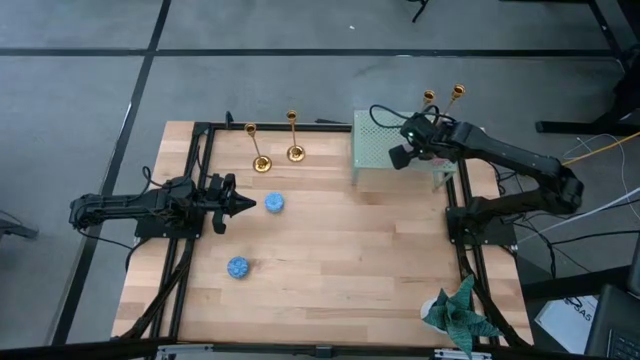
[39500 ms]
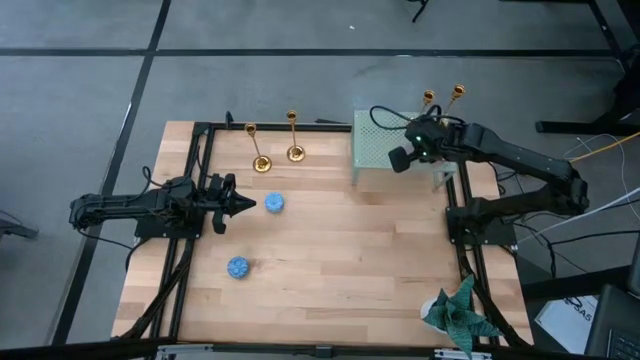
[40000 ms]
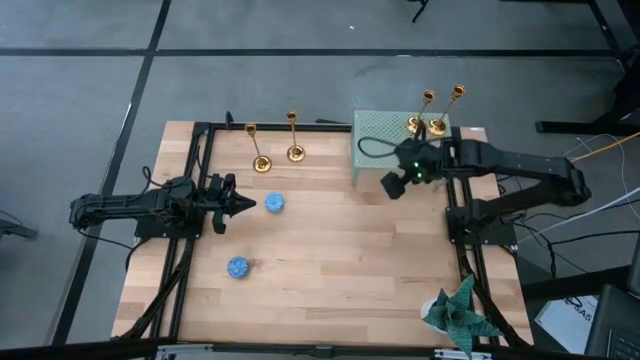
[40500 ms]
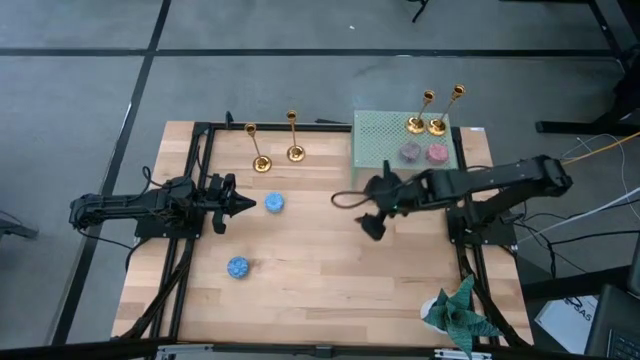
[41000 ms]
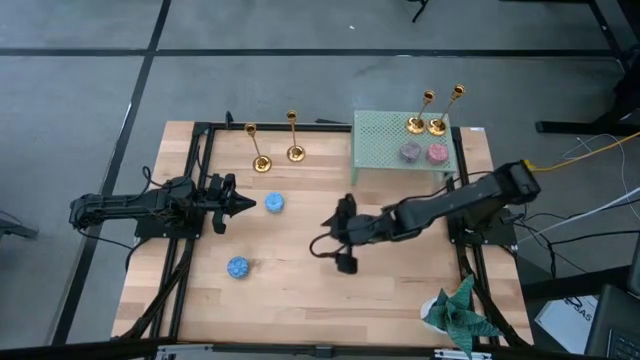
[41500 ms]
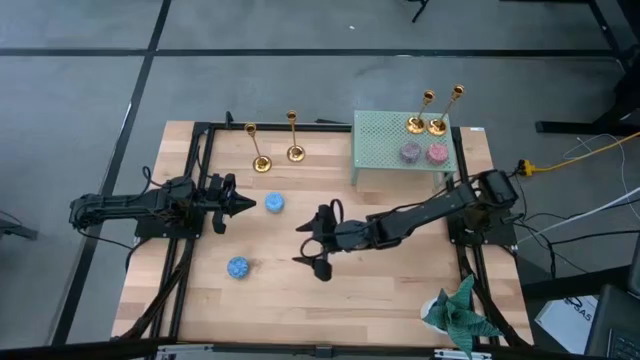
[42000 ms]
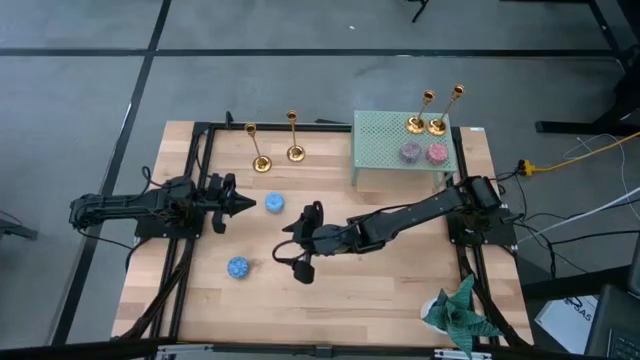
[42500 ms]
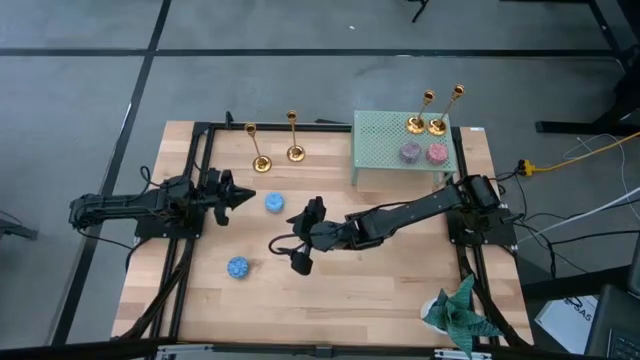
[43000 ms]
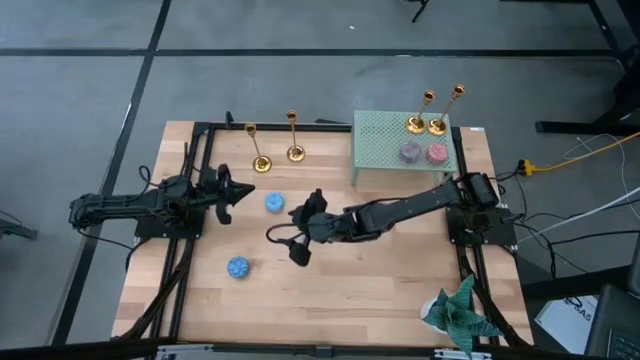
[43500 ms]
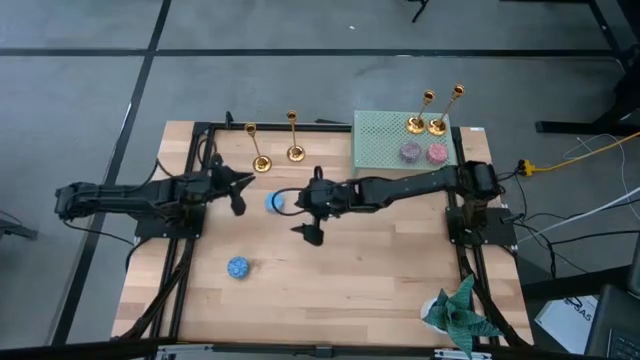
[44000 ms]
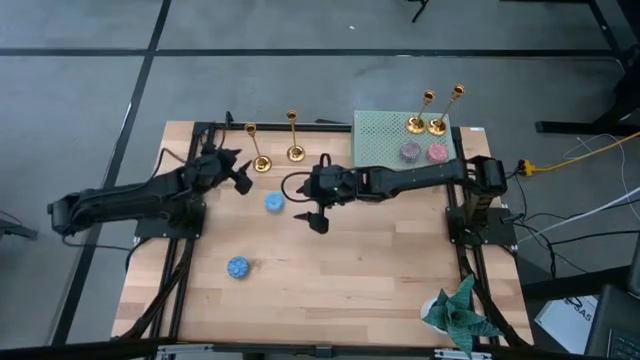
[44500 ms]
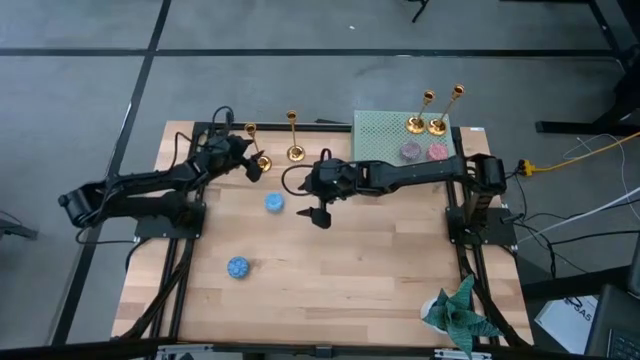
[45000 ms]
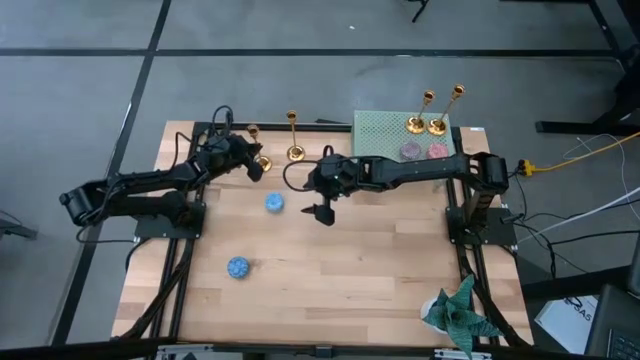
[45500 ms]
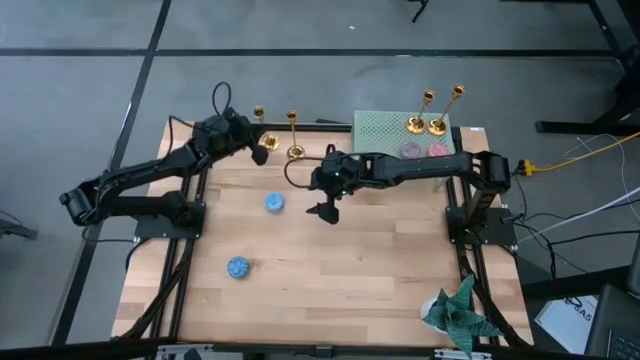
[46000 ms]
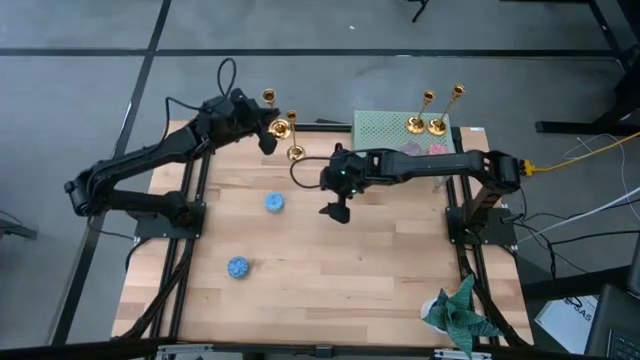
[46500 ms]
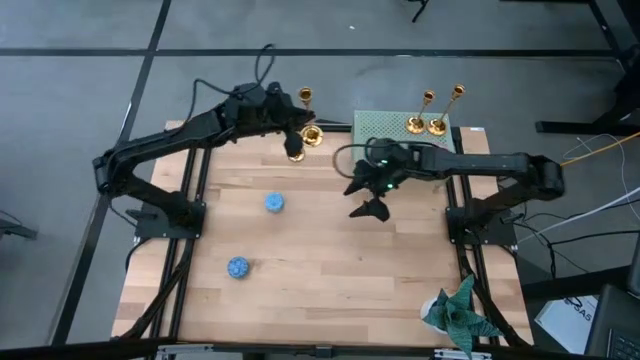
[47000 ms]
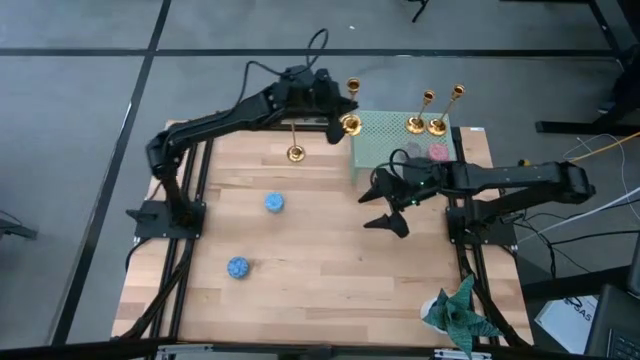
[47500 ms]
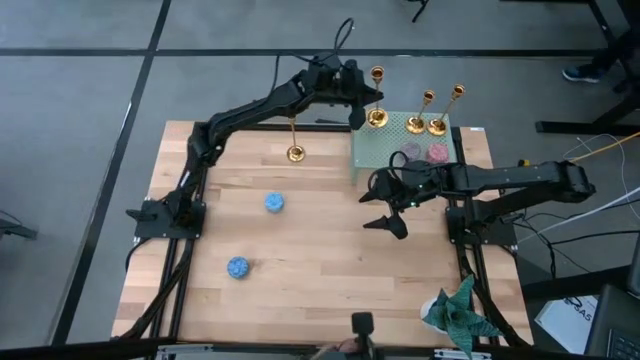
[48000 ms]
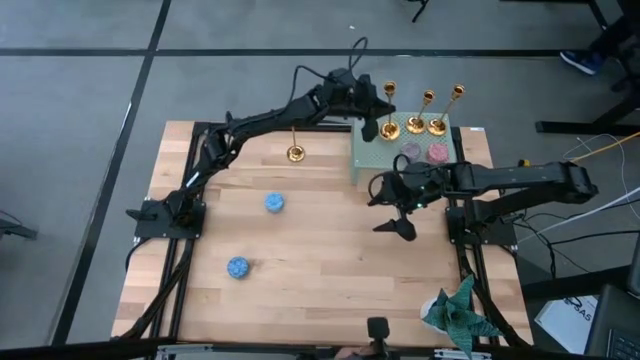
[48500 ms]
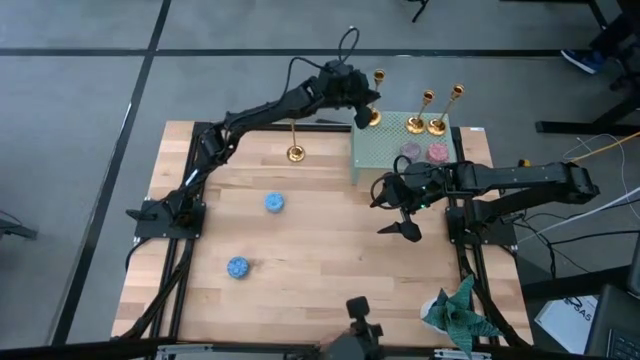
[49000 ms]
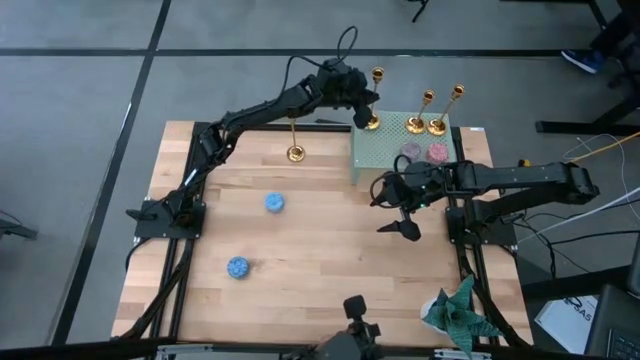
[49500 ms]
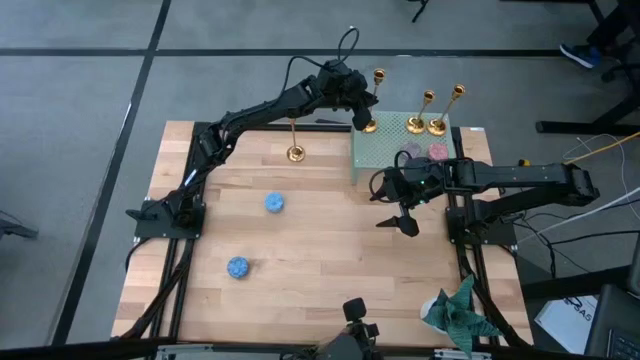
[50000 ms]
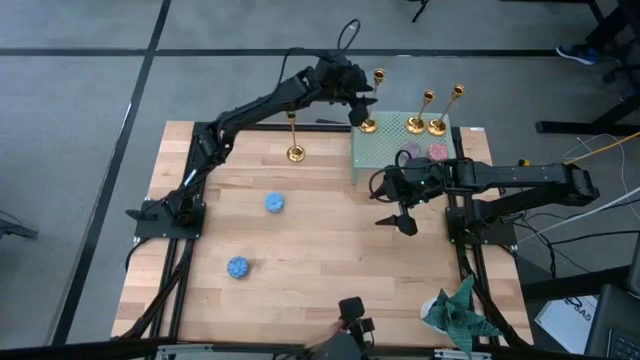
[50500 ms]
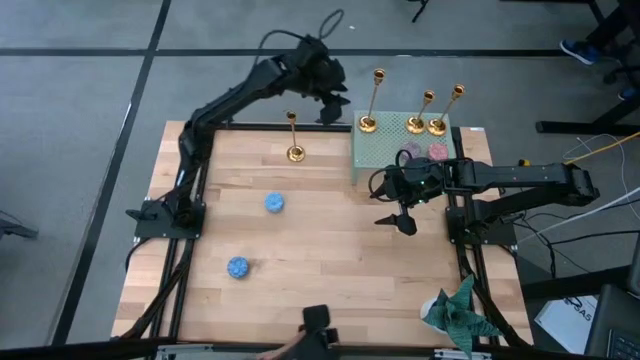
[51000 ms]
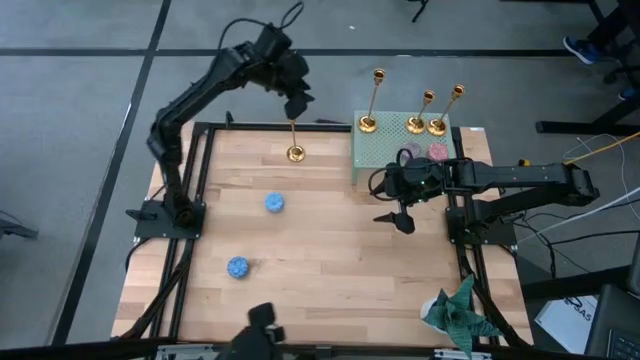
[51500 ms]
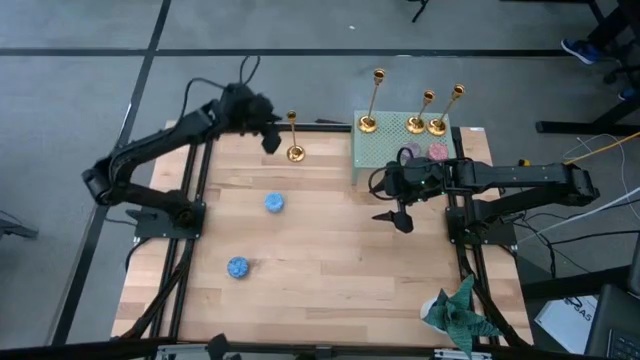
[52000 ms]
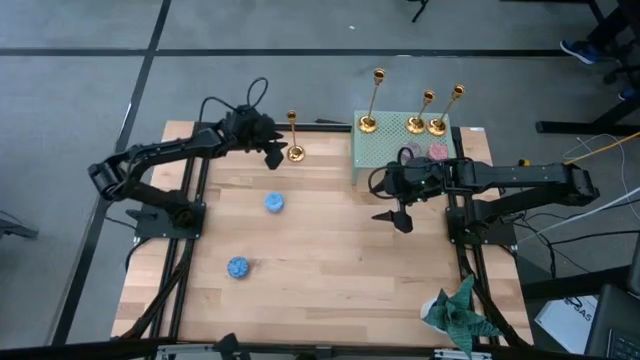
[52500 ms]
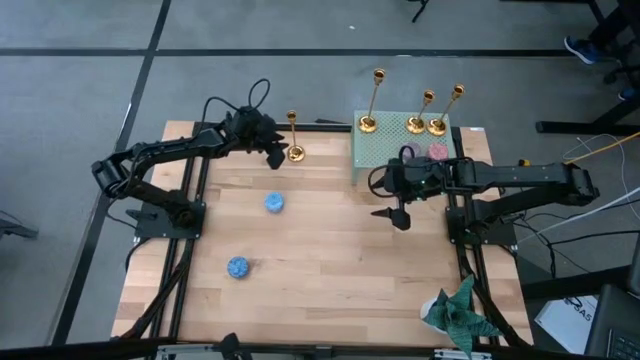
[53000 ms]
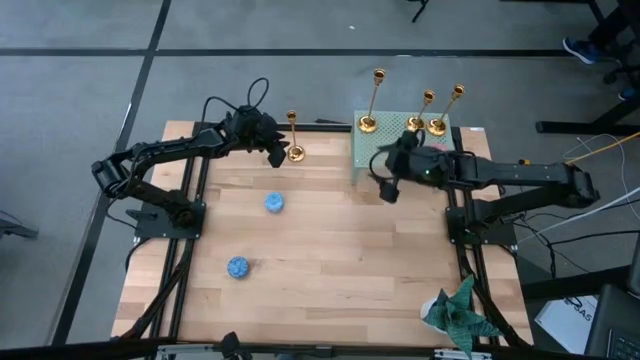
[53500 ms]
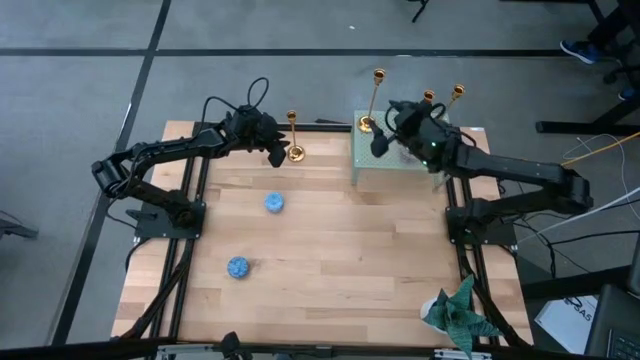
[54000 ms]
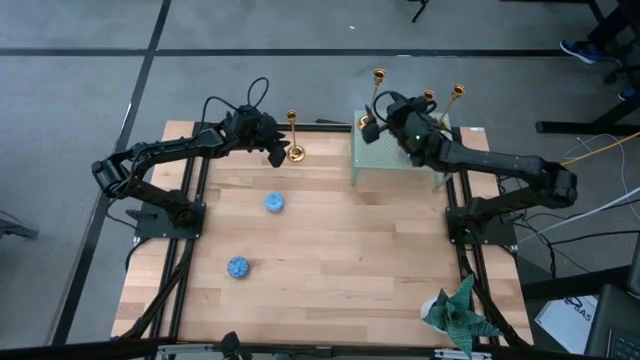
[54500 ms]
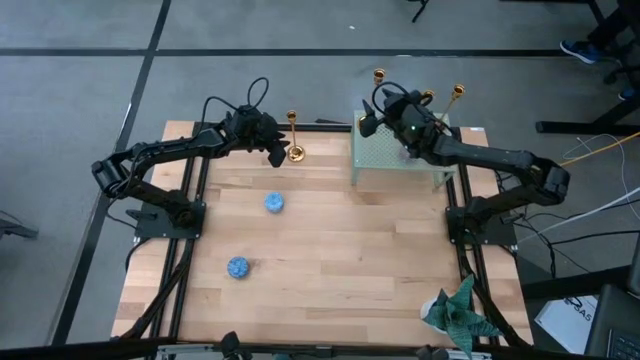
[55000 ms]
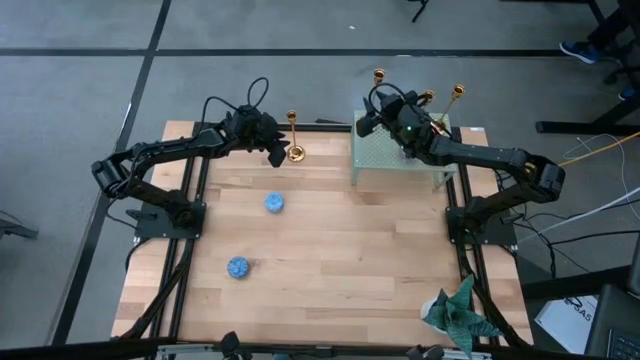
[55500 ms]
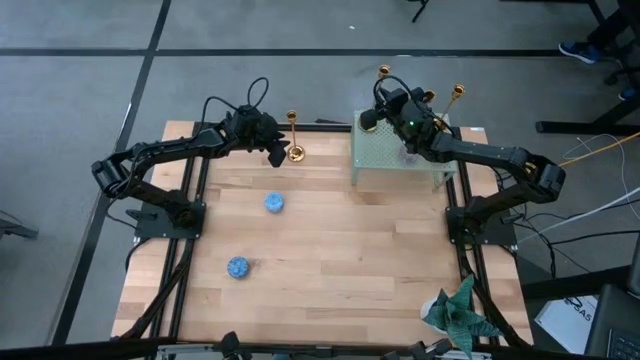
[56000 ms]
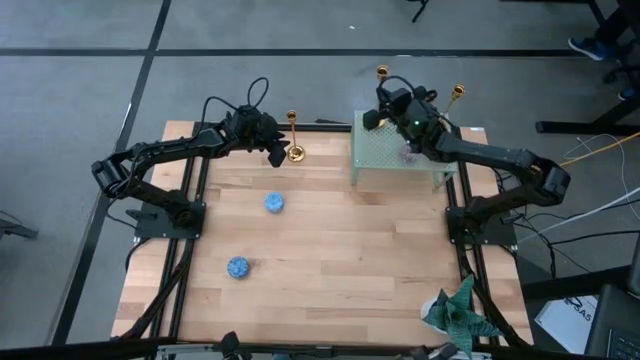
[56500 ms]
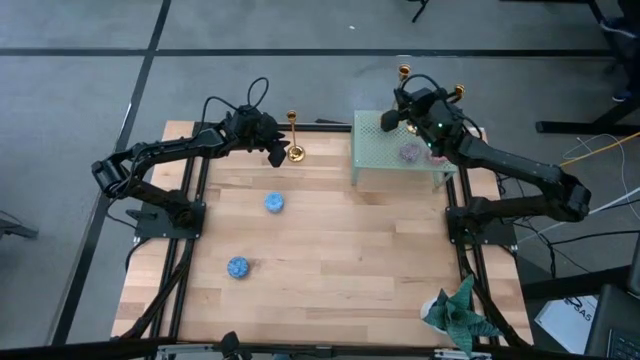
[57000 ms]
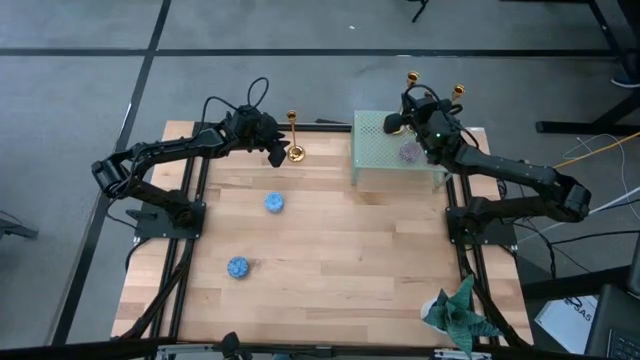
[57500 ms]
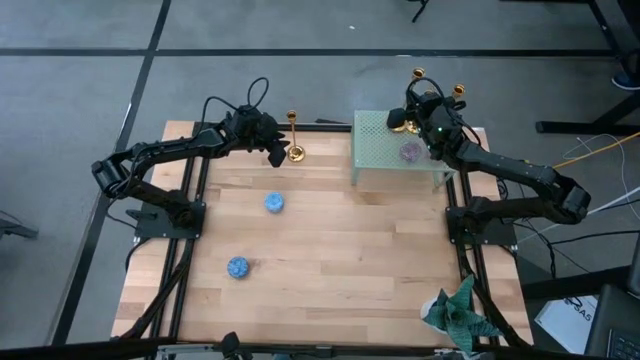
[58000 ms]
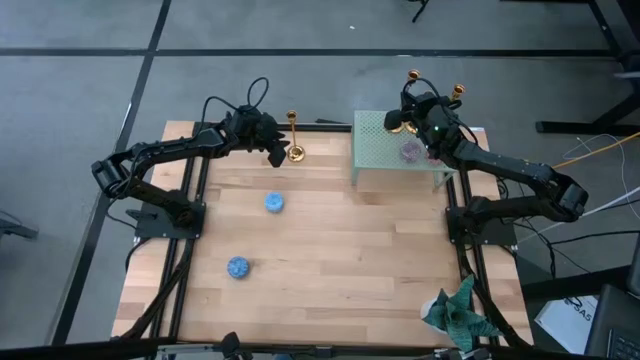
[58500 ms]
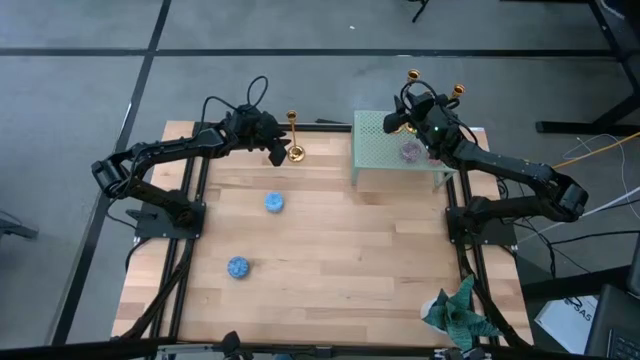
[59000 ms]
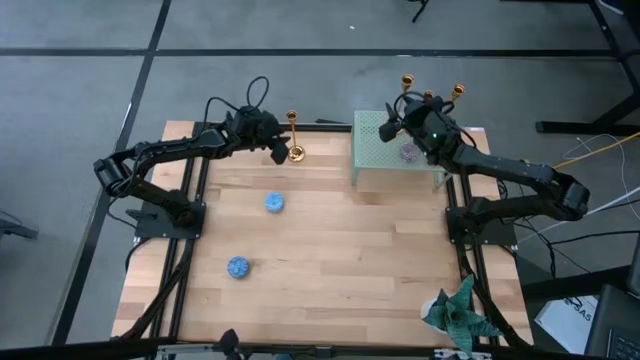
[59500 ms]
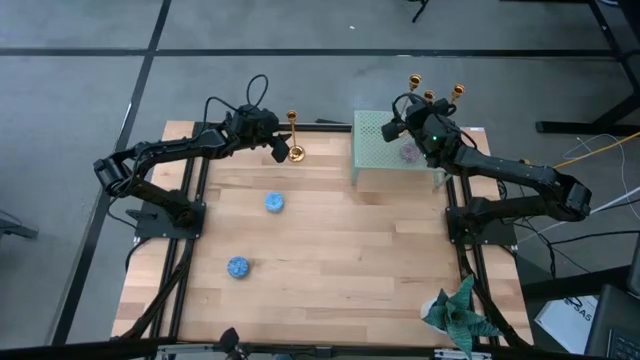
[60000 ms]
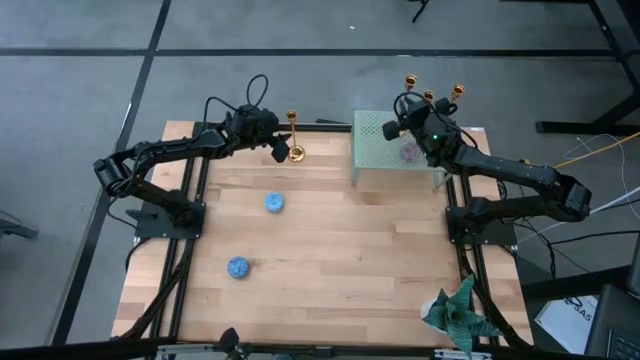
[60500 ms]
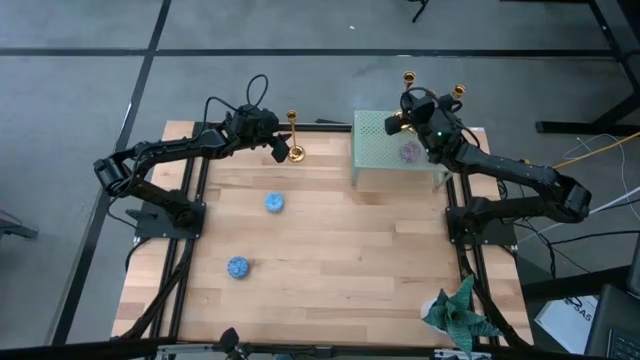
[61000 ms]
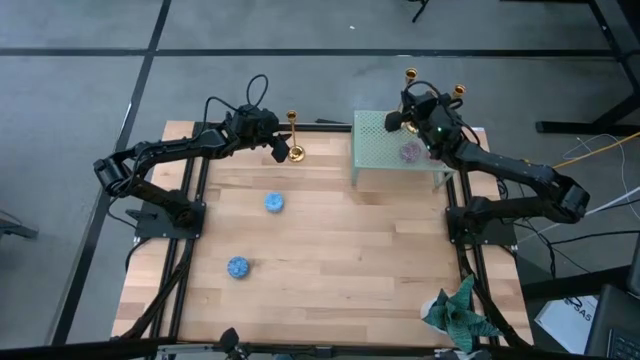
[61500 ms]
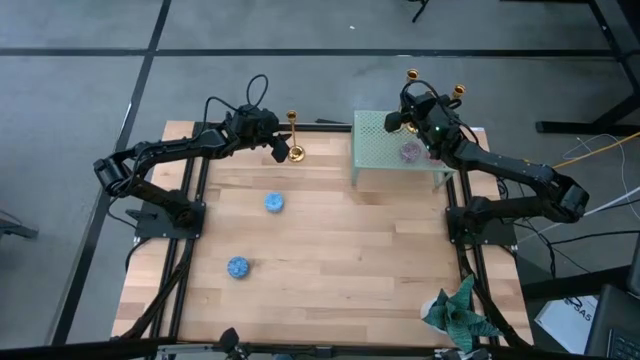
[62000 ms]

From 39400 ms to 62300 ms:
Task: Pick & Place candle stick holders
Put the gold candle holder on the shelf
